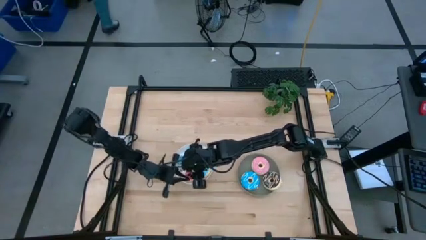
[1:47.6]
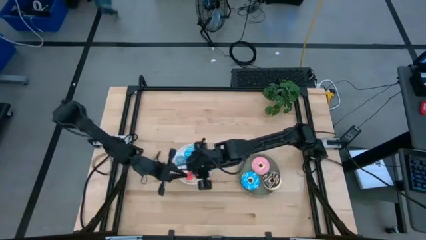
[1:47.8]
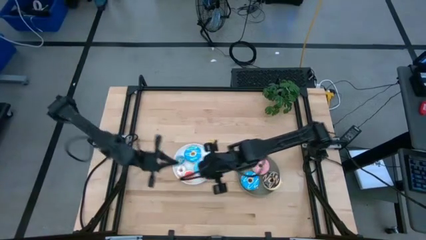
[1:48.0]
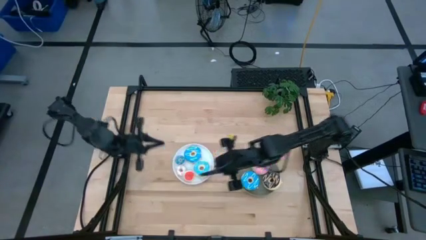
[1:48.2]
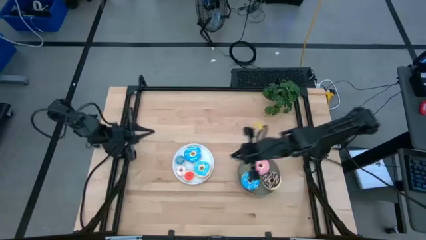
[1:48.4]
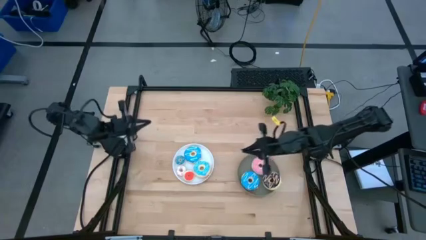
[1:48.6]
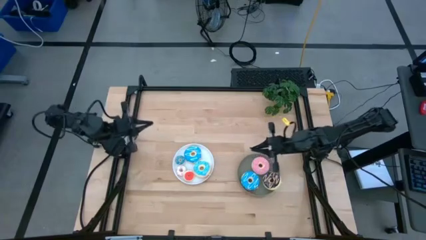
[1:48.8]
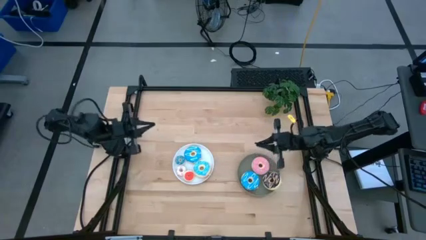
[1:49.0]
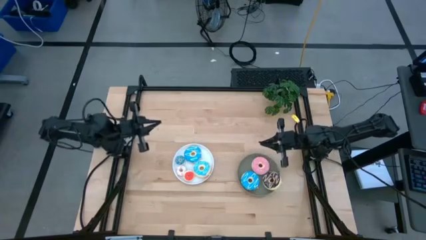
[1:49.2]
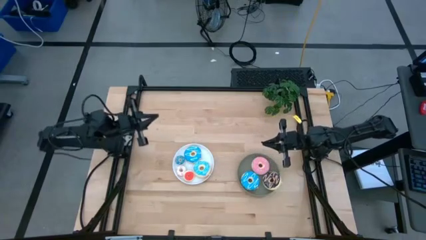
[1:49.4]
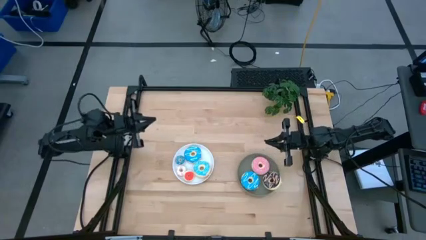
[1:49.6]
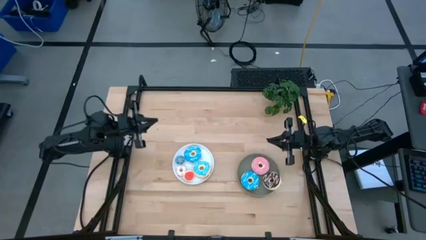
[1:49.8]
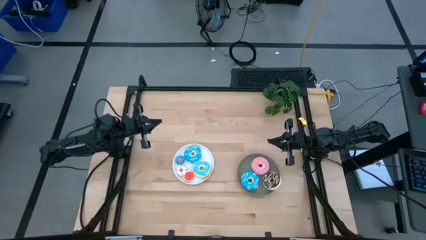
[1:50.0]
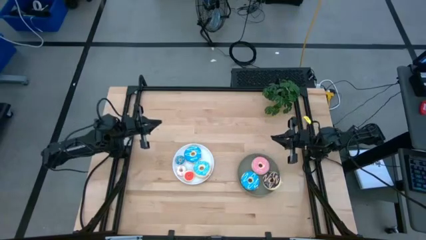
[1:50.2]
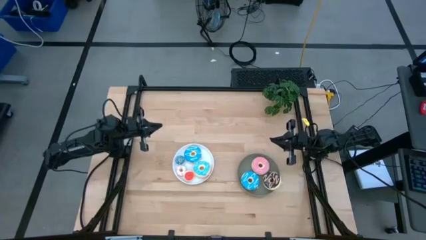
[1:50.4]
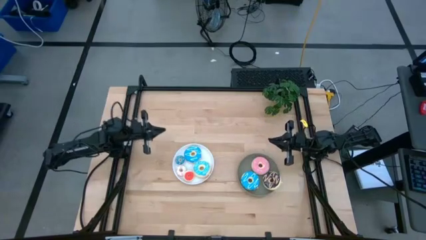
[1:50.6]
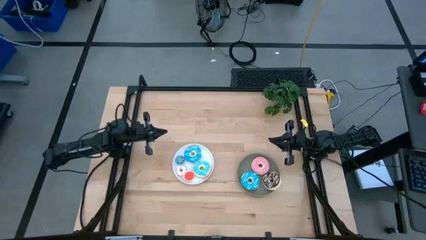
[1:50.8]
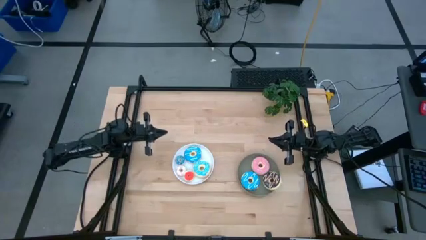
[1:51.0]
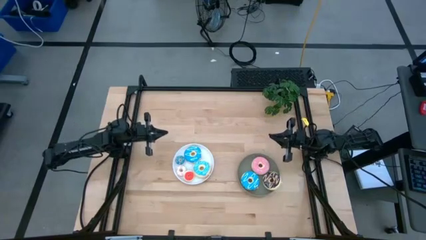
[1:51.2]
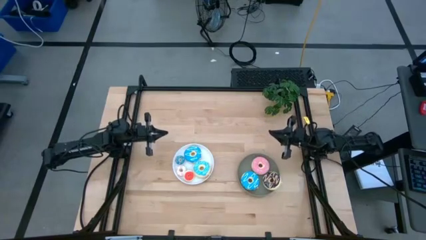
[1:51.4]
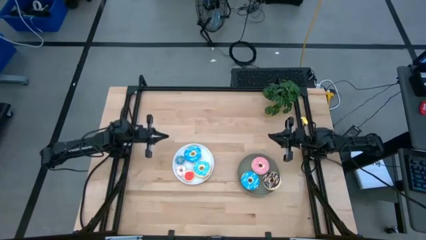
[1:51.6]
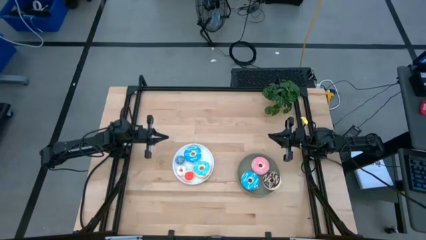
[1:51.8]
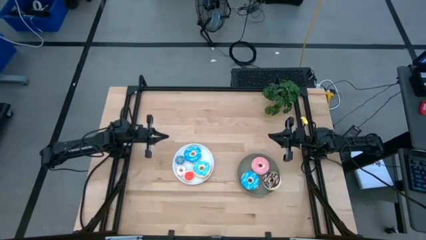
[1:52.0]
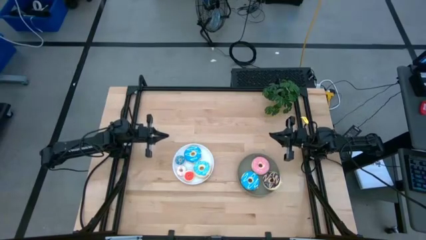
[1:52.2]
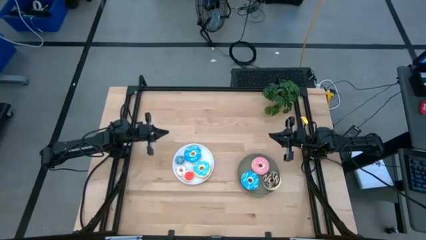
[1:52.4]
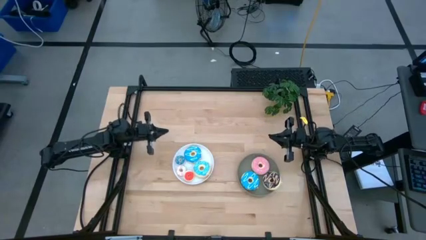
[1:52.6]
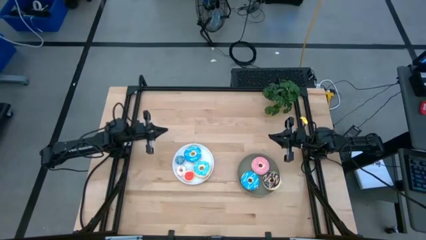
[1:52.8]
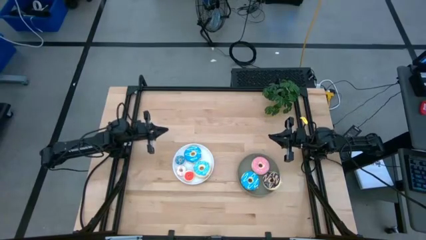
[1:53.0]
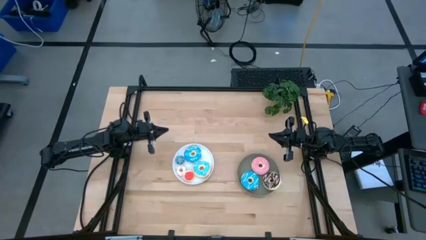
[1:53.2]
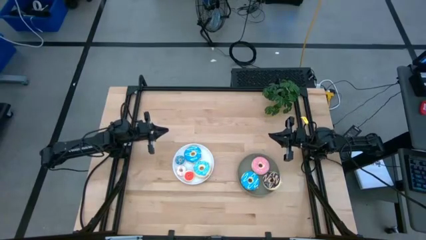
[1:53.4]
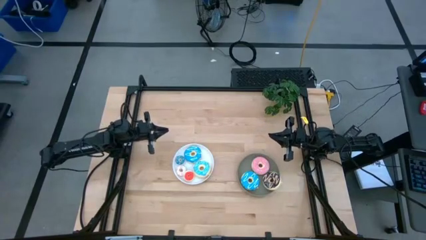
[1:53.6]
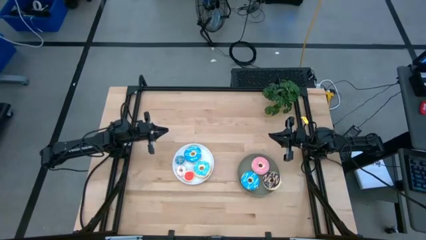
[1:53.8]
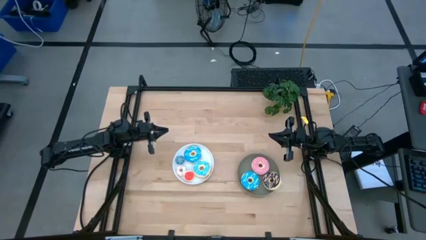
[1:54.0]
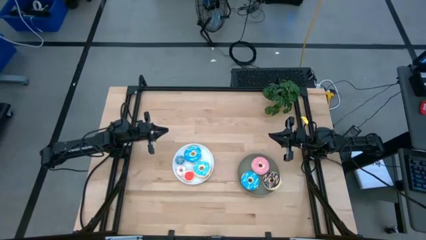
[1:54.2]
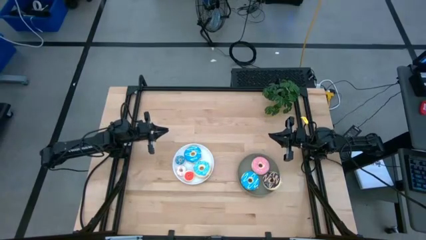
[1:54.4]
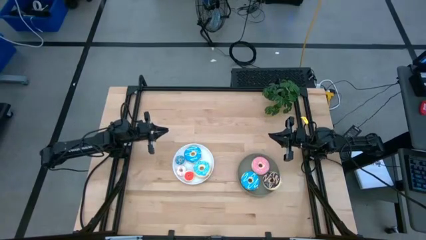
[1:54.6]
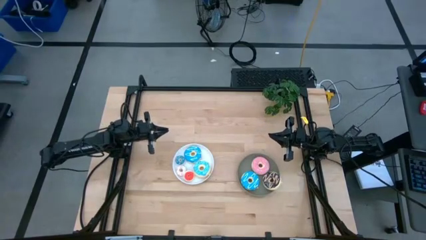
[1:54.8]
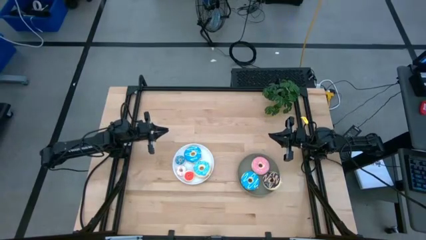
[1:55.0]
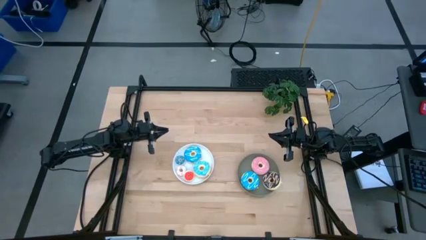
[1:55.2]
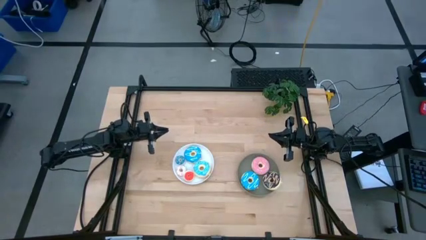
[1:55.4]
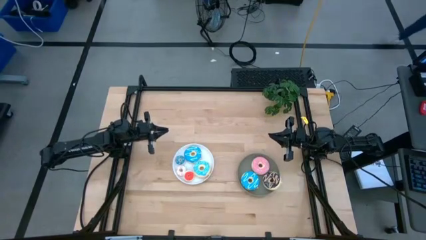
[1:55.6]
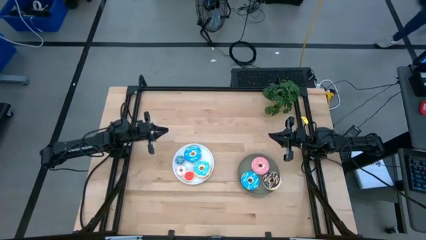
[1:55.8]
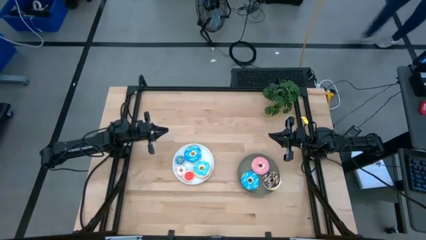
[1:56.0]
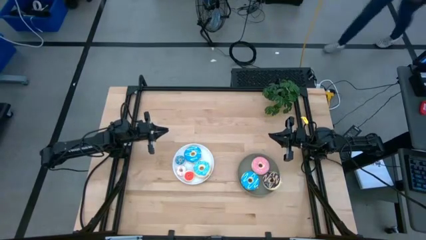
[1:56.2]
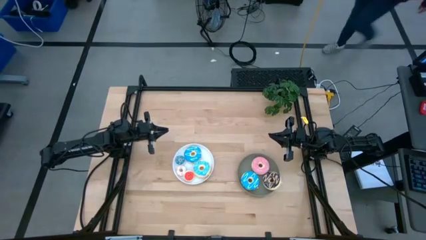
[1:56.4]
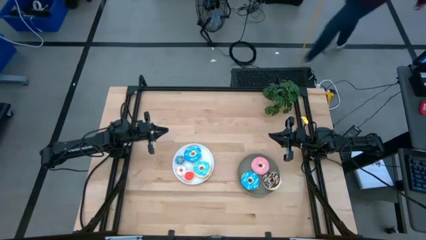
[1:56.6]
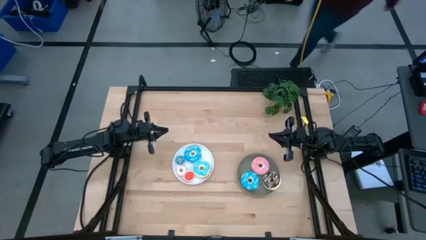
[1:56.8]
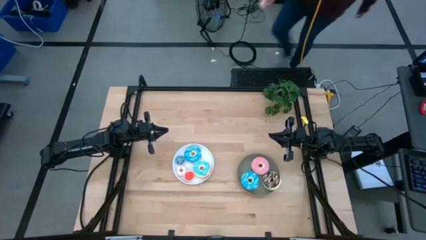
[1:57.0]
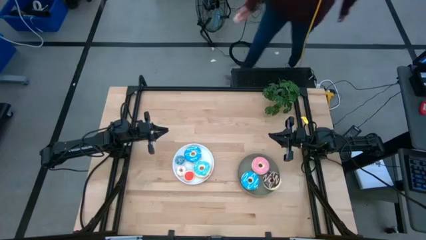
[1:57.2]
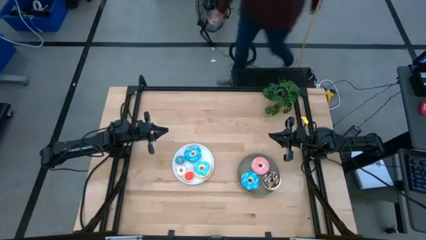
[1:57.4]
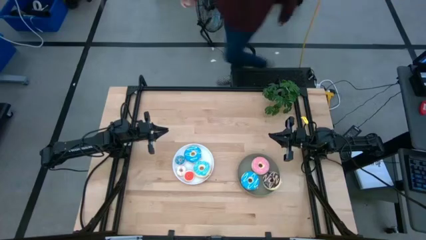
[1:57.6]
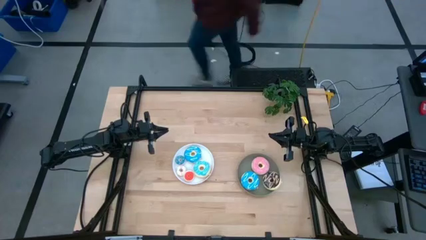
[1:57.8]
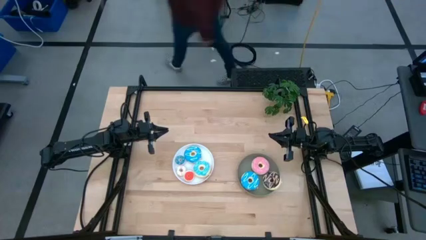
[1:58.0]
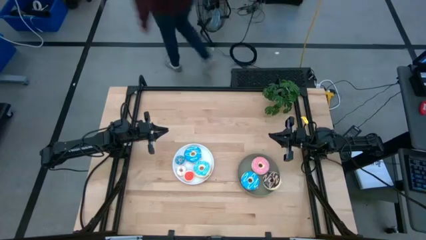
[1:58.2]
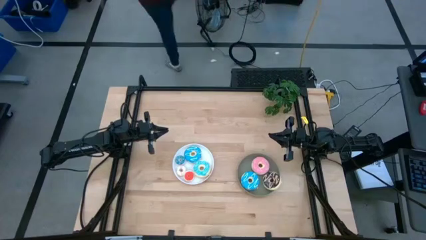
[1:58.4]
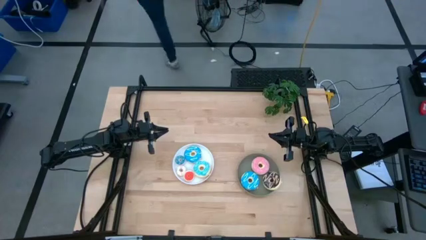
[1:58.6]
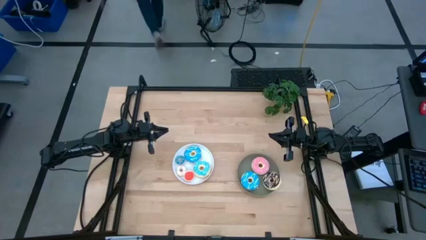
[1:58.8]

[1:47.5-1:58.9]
Task: Pick & Place donuts
Return to Home Position

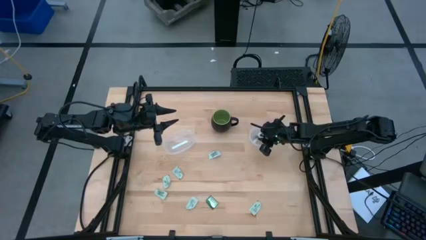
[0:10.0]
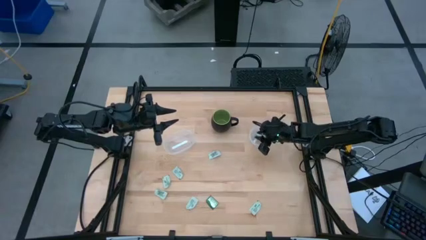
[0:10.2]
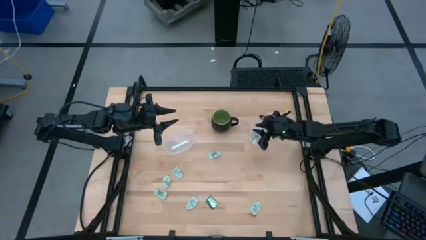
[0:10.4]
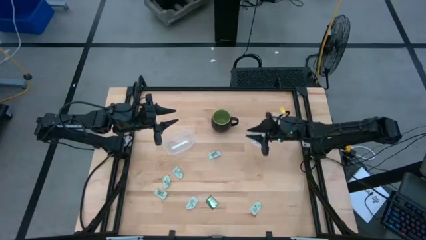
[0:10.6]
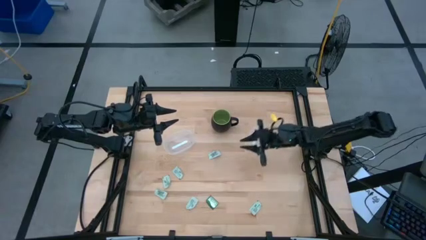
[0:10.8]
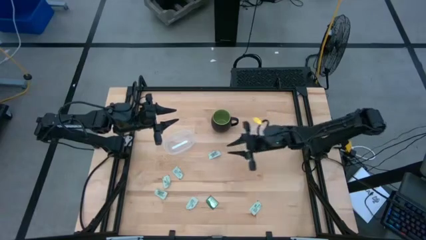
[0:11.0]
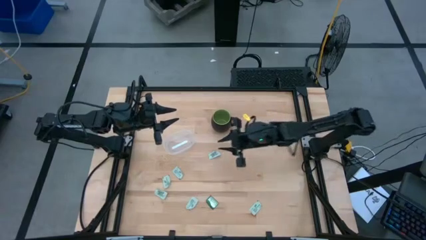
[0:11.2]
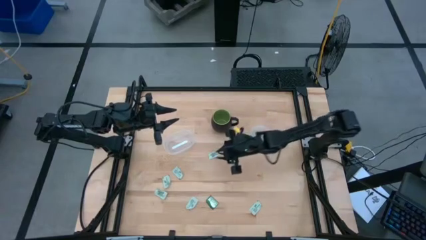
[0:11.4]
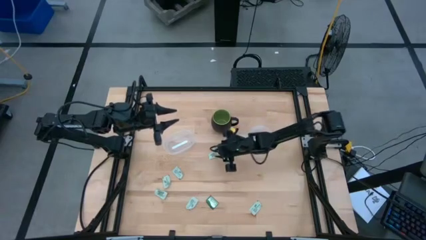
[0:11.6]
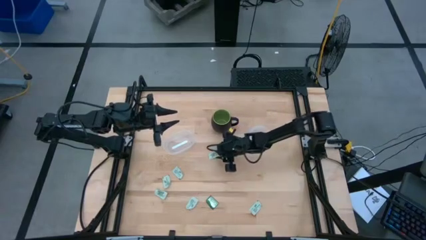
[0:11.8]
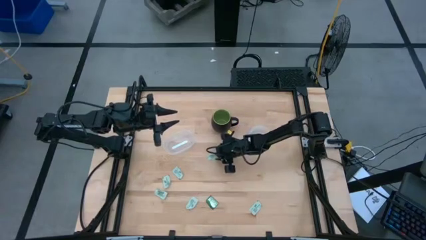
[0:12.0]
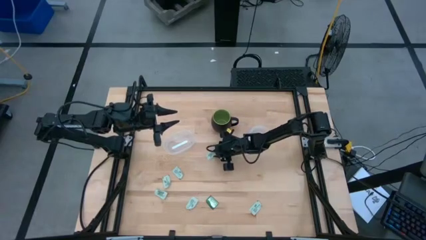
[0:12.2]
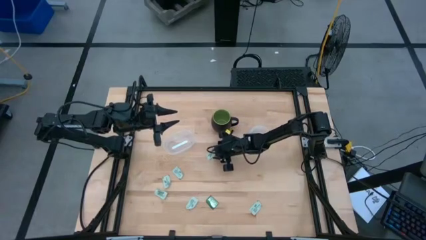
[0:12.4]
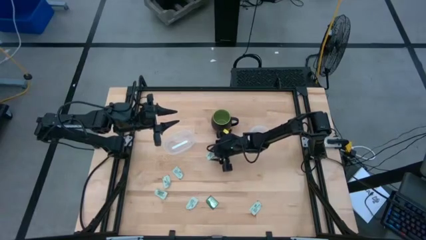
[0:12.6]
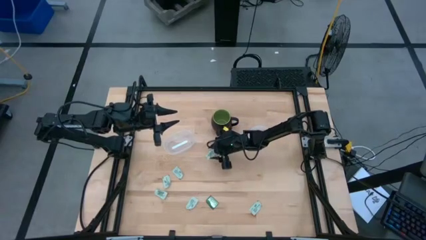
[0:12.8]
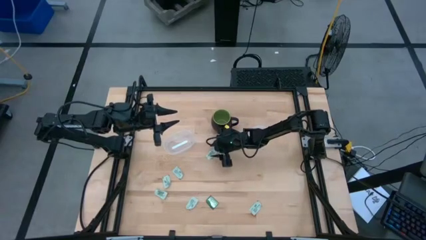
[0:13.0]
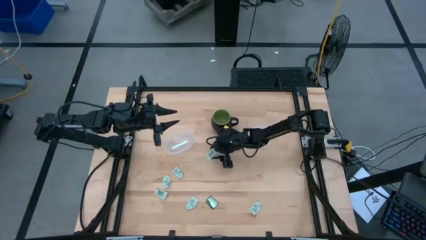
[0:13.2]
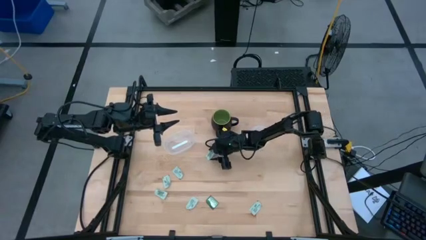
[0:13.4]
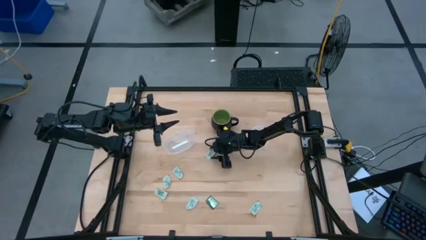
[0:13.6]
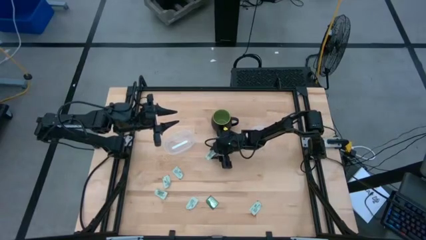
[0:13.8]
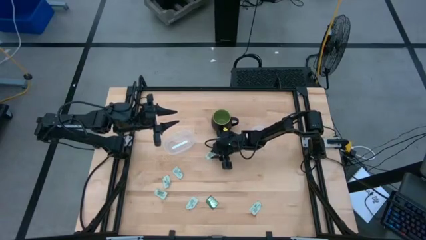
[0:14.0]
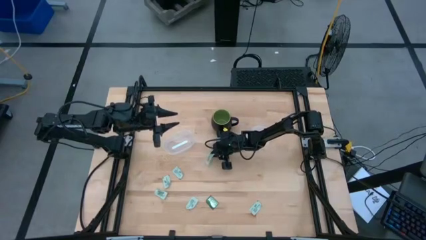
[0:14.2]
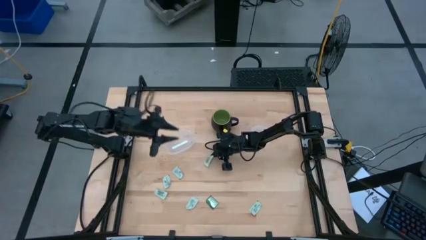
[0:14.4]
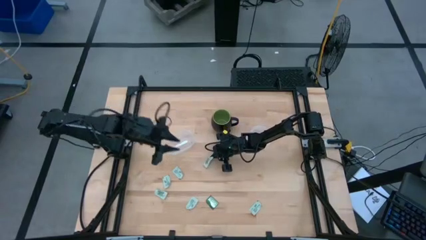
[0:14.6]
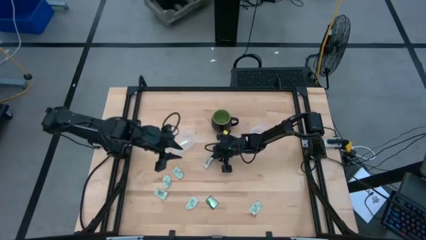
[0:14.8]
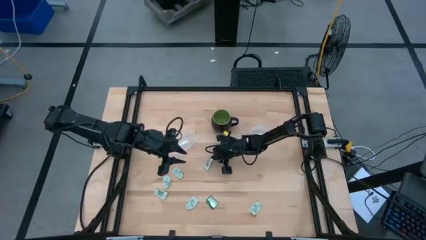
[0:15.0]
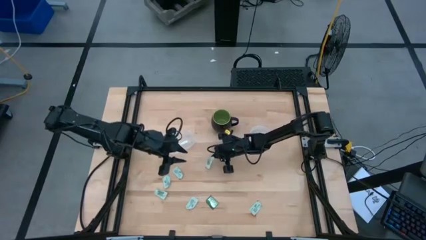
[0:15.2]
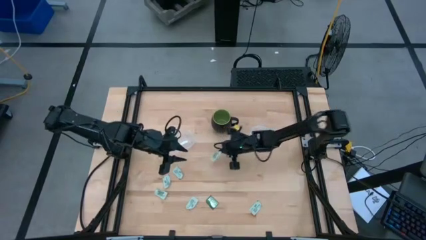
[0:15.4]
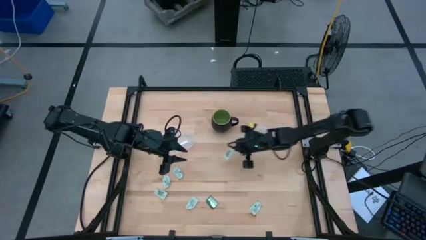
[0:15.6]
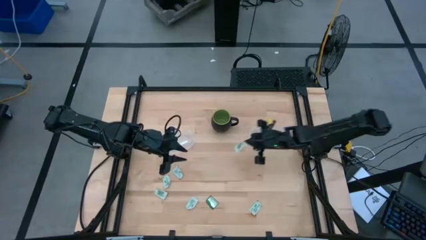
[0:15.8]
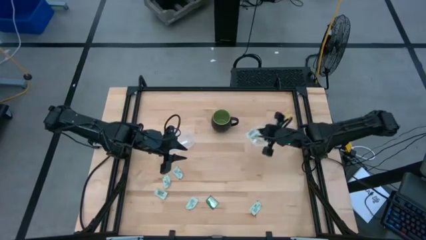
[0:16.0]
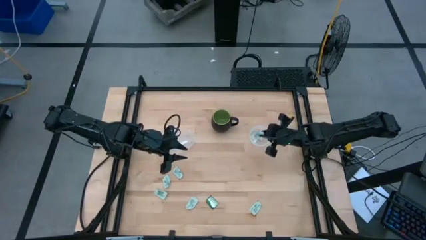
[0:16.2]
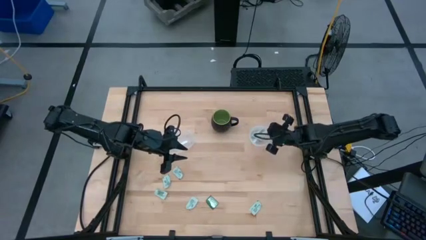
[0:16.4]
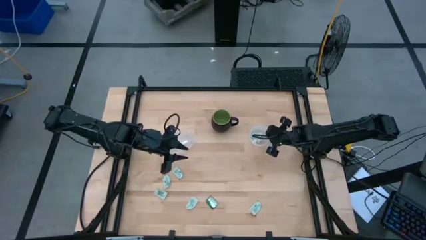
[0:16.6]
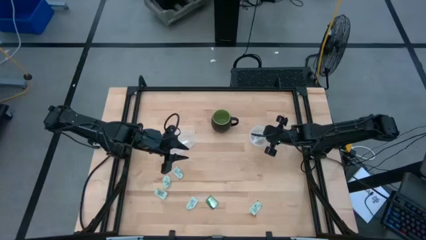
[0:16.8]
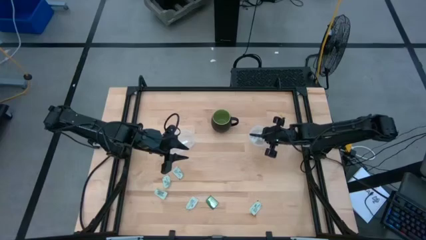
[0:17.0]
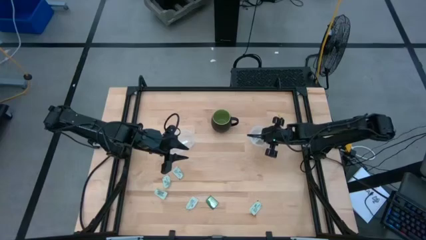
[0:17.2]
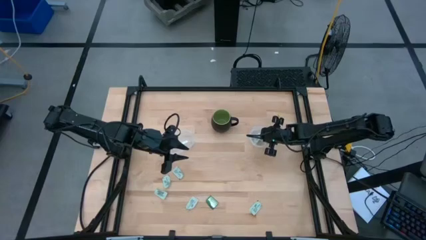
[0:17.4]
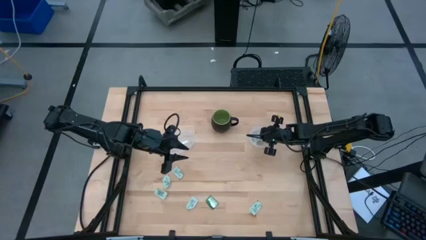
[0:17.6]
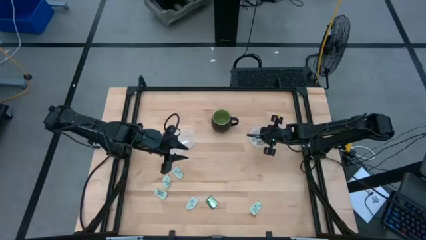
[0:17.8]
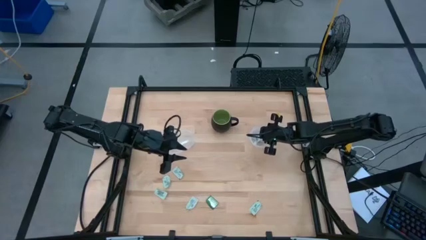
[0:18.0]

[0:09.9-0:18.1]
Task: Pick and place Stevia / Truvia into bins
Put the green stevia packet into the right transparent container
